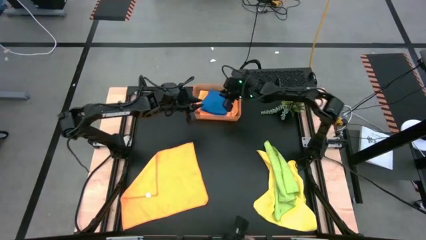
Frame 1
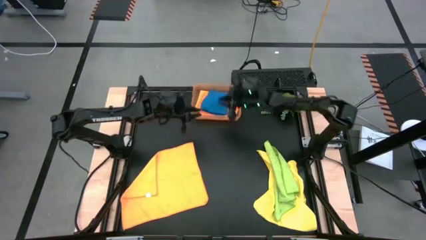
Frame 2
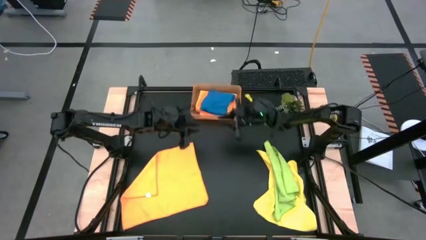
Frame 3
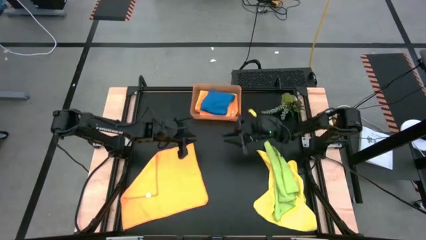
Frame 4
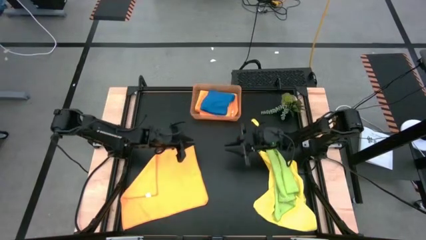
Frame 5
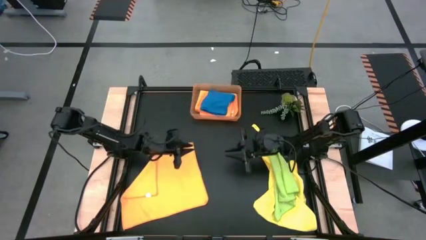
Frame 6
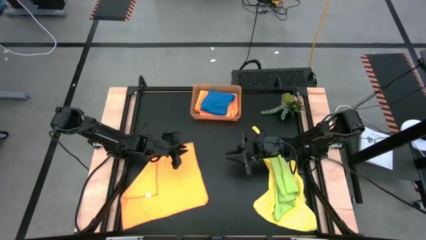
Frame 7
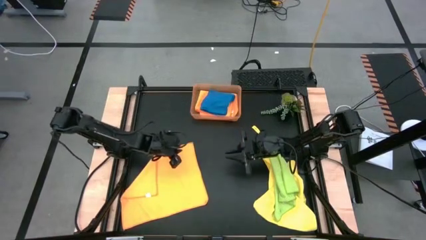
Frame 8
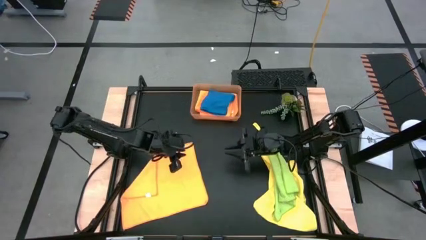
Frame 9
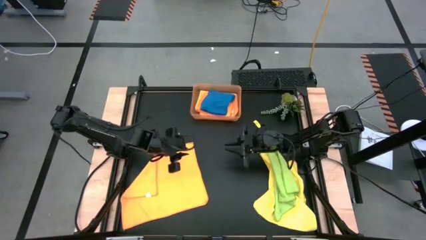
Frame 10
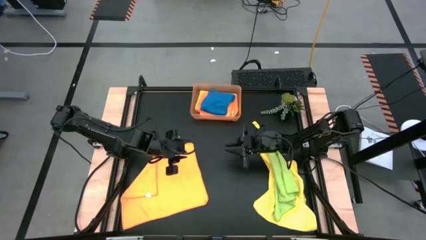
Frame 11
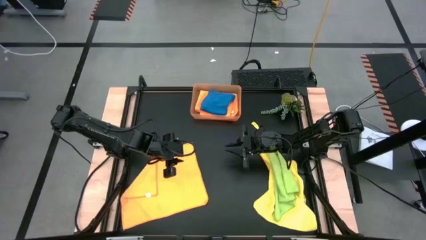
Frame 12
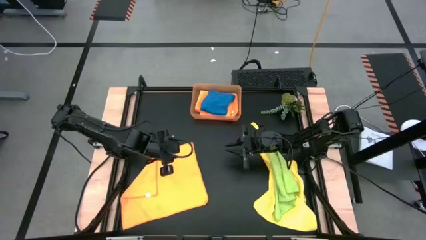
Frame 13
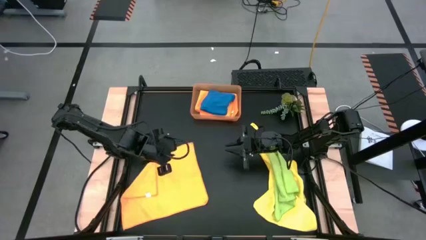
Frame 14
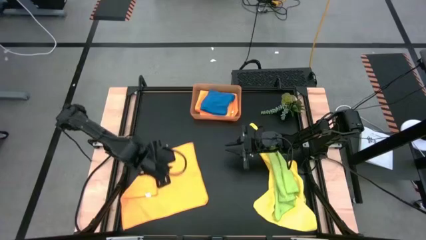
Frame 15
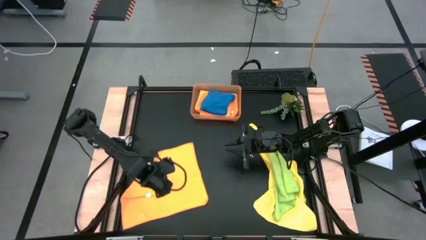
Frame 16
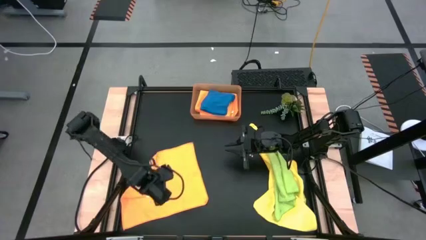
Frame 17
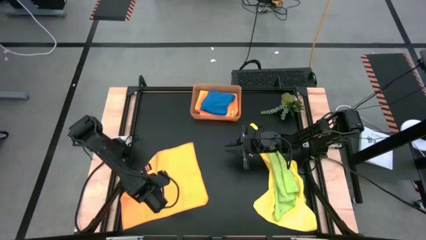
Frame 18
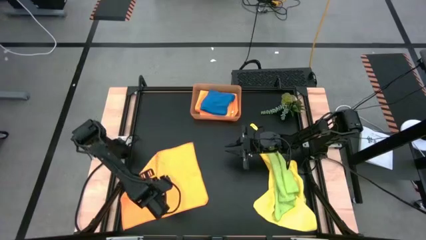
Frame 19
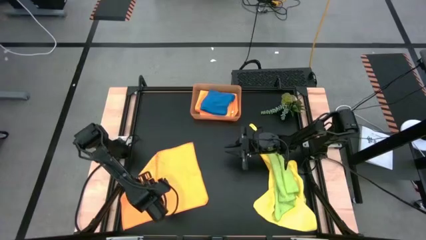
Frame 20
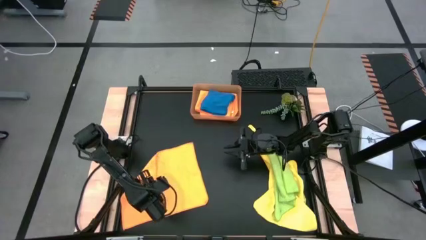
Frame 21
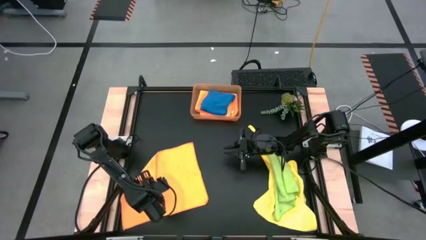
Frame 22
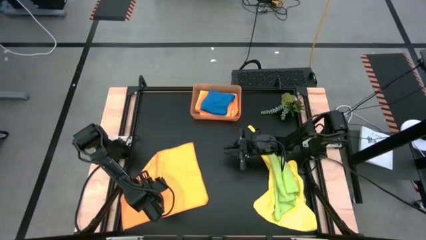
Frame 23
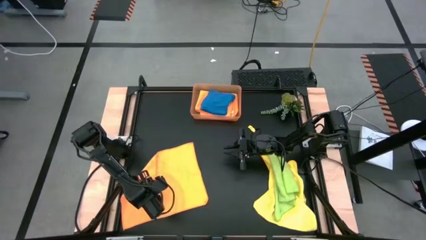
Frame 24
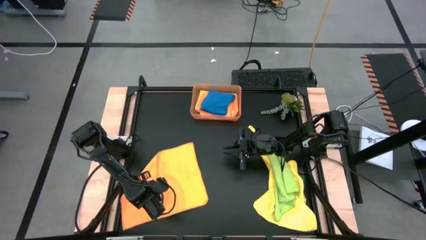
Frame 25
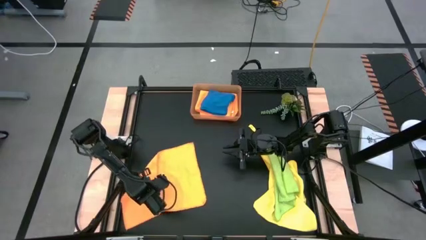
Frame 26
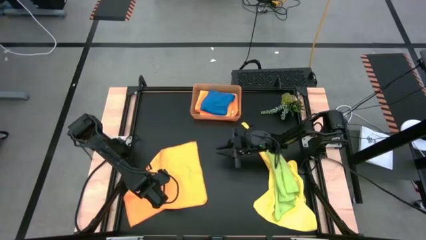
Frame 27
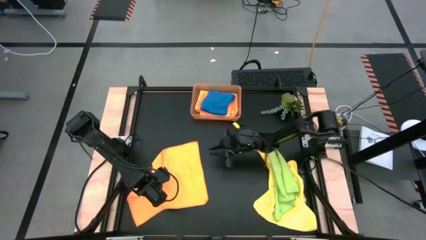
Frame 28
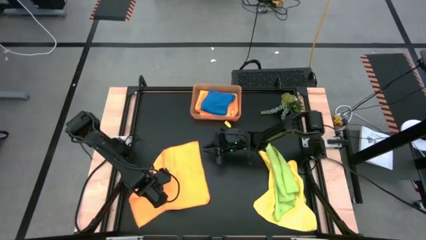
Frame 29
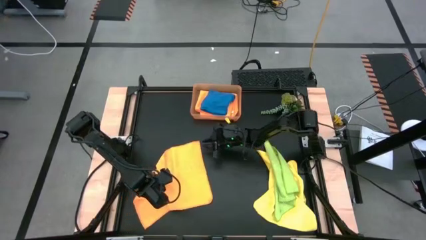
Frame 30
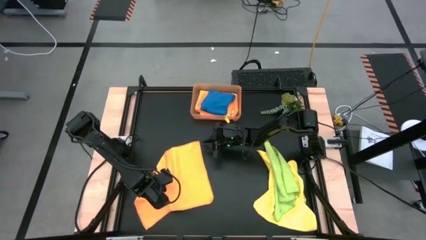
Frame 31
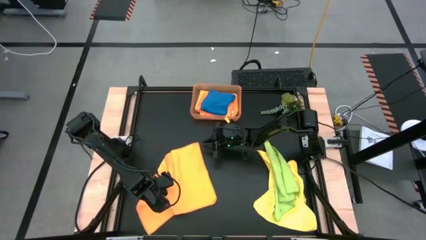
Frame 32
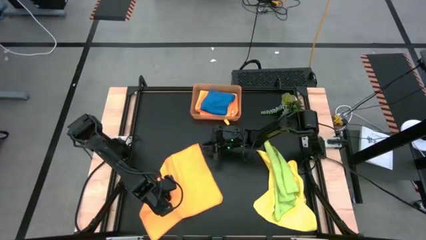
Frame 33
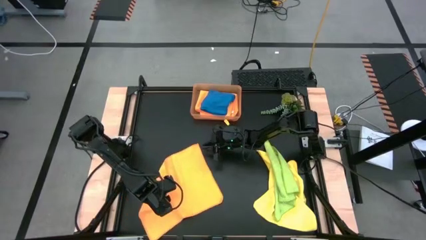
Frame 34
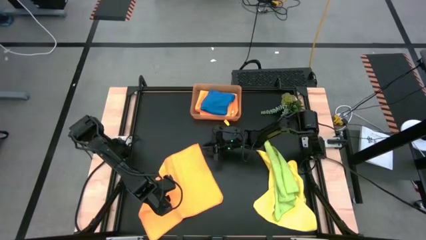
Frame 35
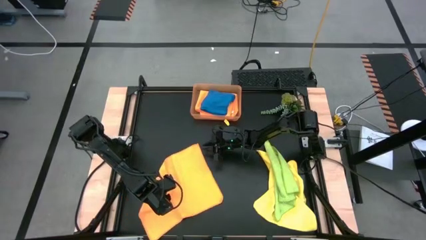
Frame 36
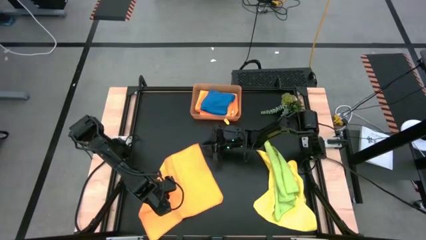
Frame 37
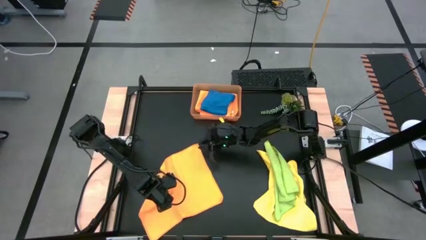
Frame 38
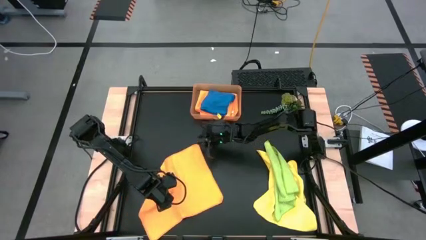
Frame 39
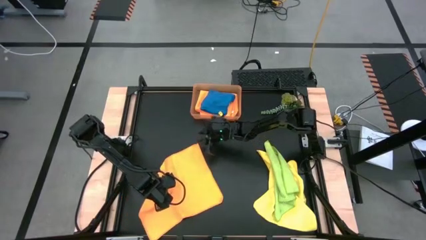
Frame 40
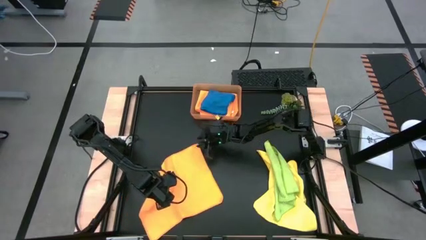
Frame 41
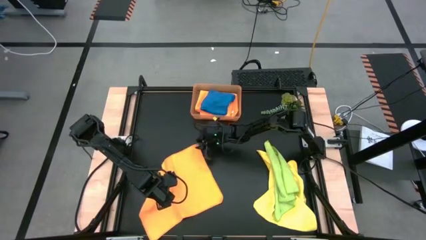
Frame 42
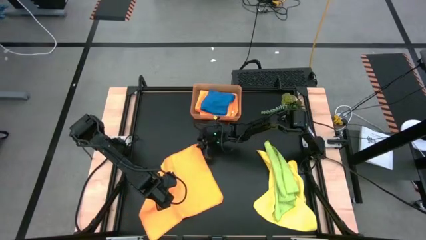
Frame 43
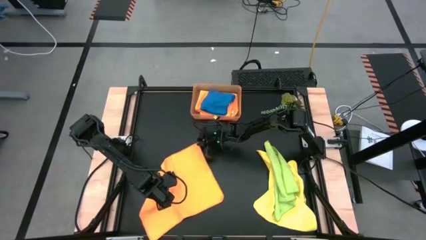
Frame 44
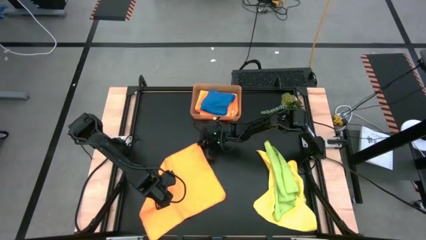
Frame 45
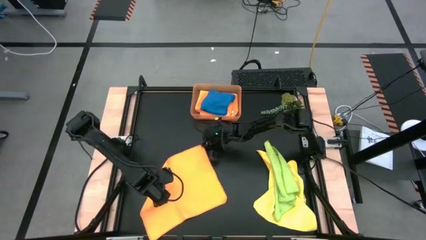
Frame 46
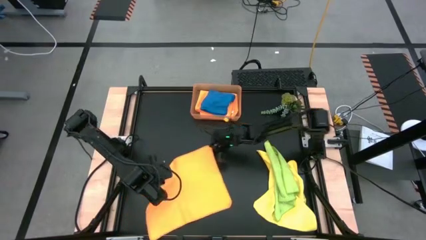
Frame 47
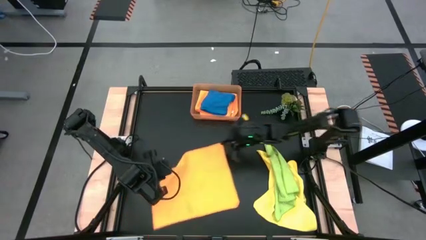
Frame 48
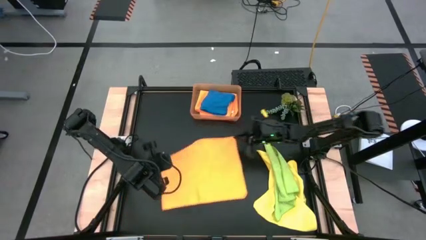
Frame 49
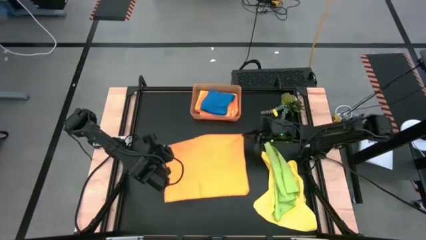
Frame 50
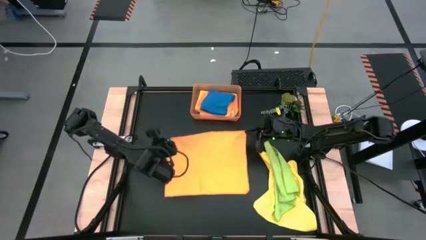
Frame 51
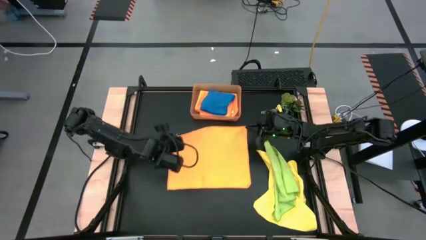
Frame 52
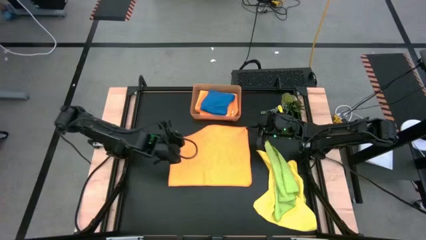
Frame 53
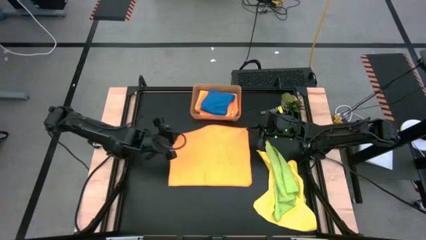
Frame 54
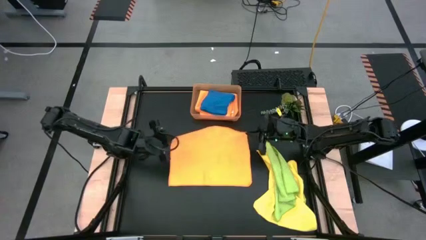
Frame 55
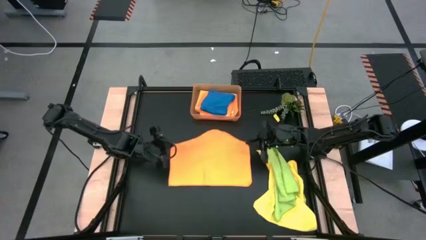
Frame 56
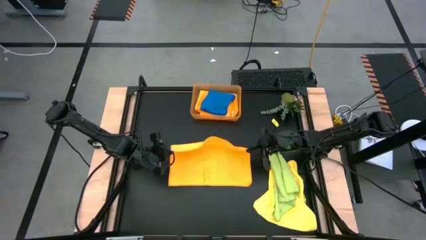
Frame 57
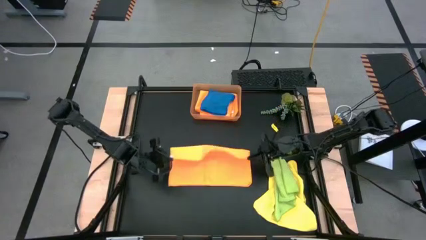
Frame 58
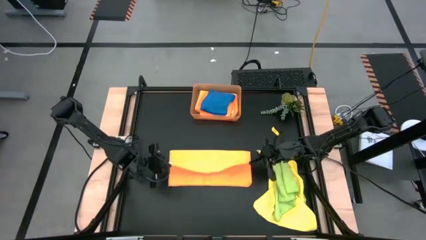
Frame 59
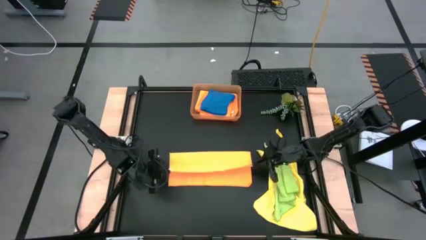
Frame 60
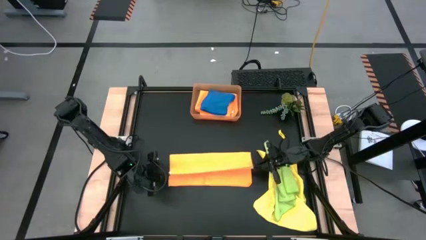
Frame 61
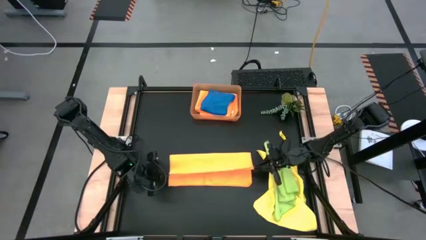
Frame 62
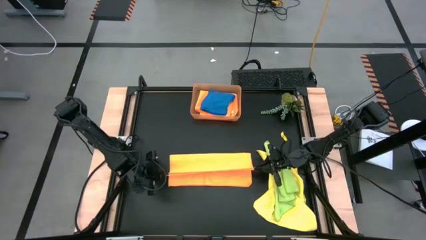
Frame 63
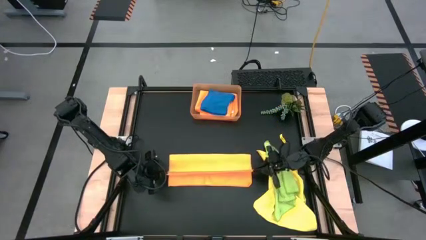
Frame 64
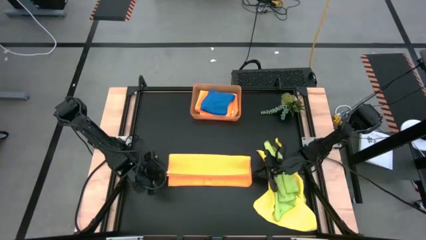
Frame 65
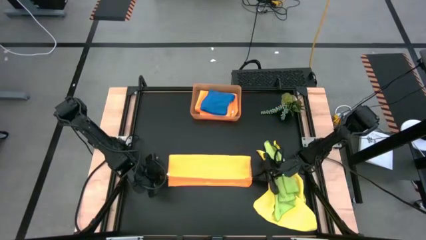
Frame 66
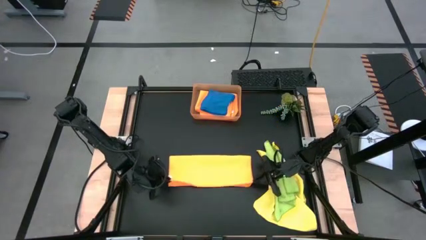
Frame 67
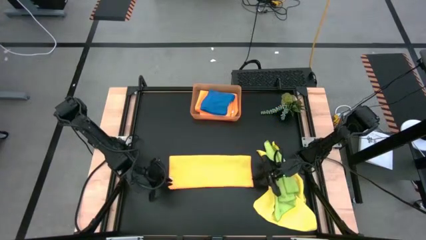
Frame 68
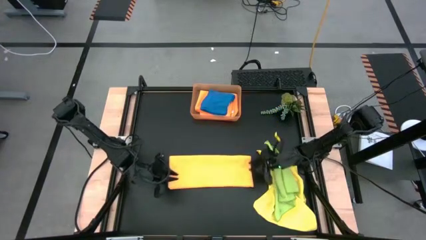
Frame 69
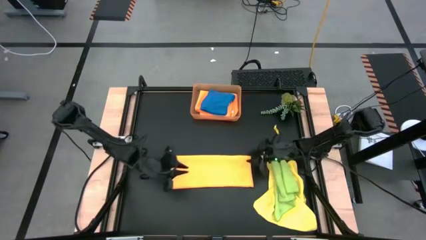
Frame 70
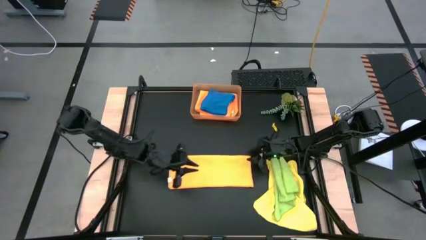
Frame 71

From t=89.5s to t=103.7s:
Task: Fold microfiber towels
Fold the orange towel

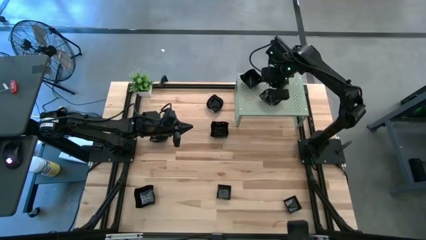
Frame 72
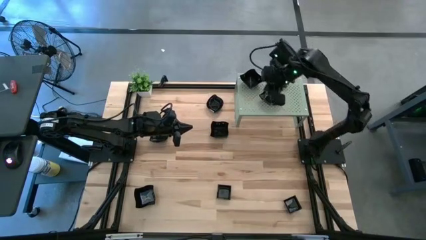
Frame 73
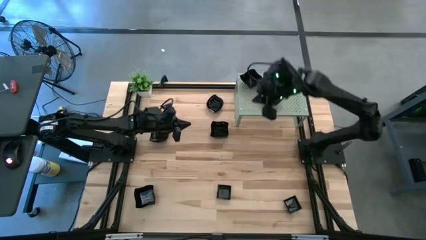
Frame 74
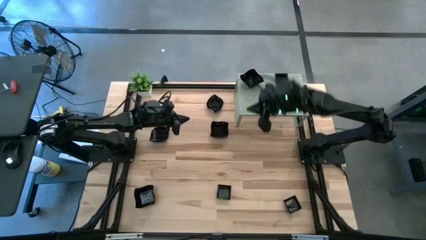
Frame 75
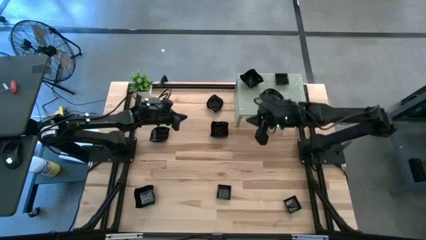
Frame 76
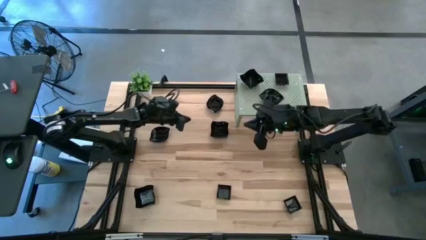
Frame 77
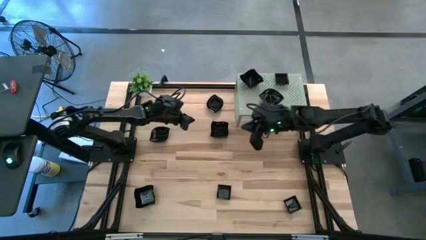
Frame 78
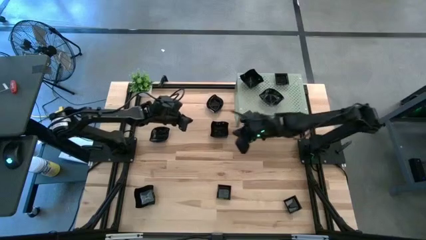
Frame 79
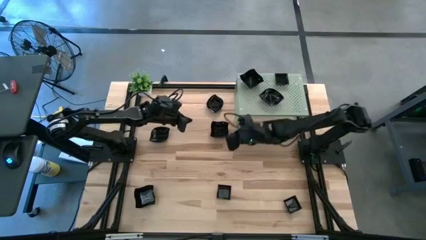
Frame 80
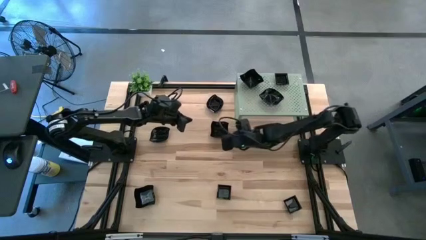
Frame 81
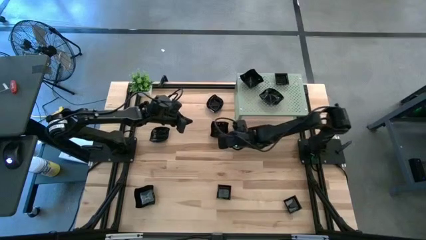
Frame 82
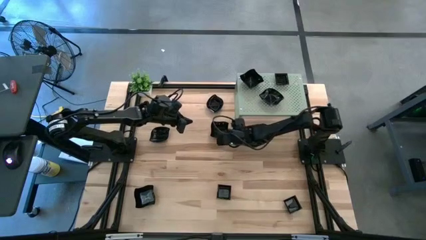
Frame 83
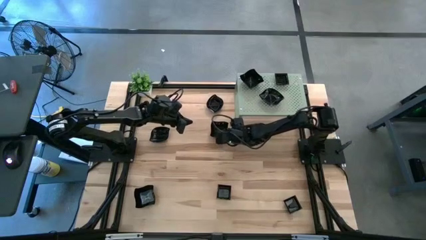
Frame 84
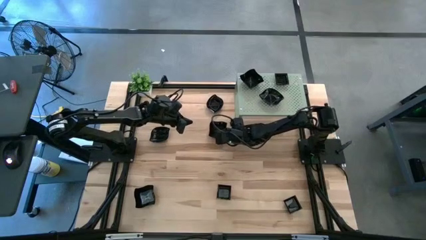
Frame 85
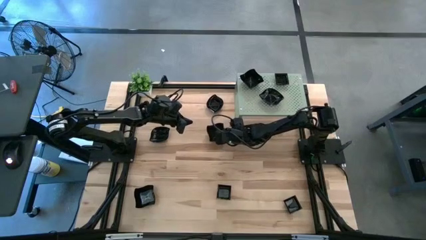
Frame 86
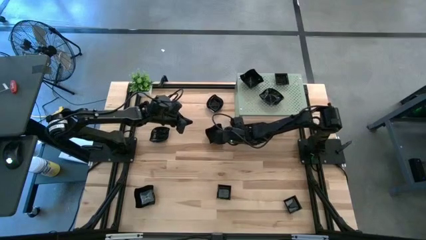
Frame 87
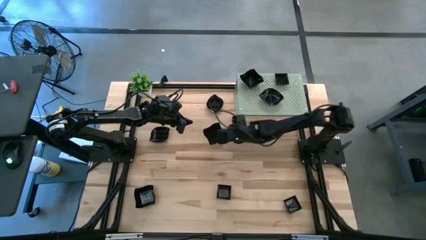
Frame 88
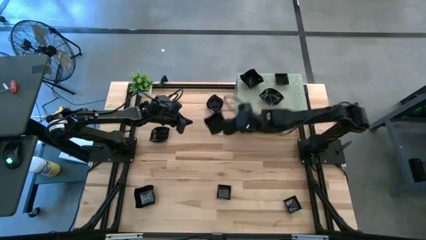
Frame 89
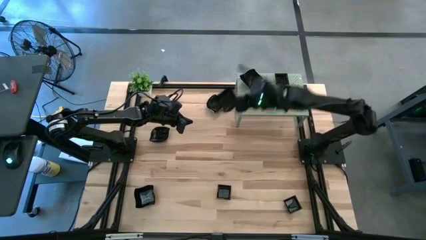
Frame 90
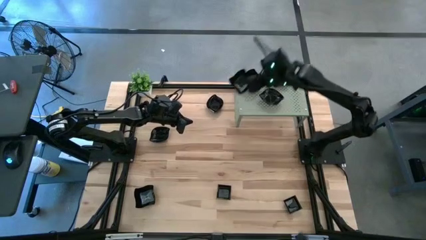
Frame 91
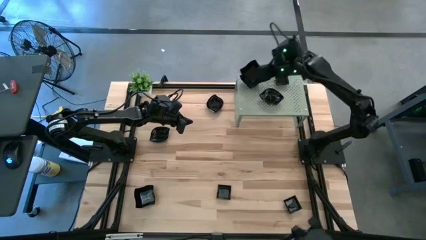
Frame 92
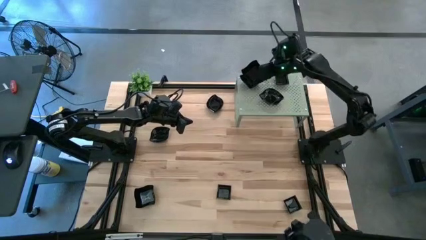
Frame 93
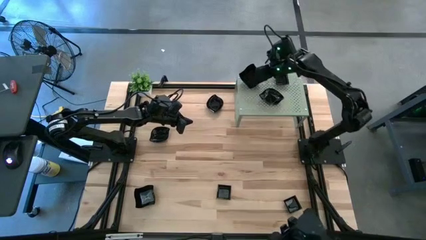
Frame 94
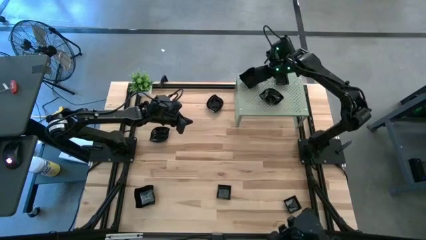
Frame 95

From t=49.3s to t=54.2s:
Task: Pick & Place Mini shaped plates
Stack the distorted square plate on top of the distorted square plates on the shelf
